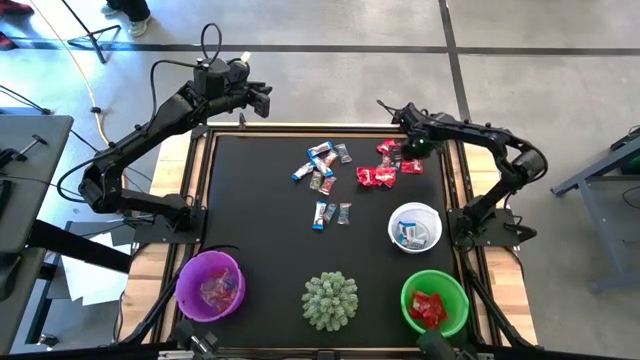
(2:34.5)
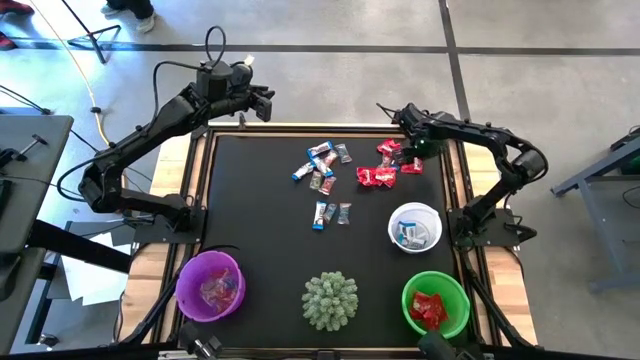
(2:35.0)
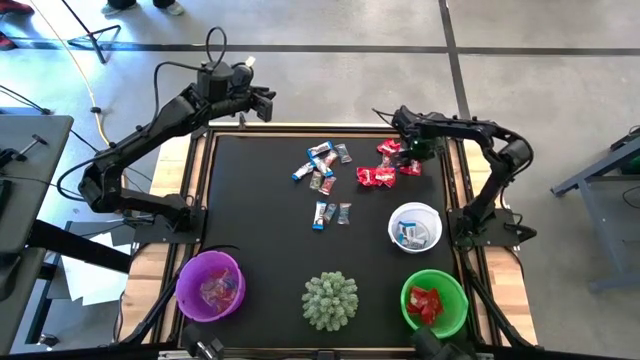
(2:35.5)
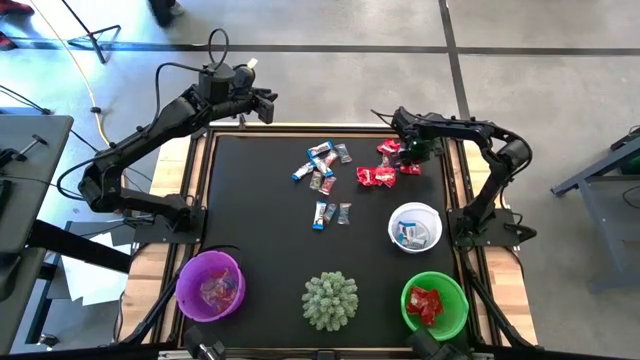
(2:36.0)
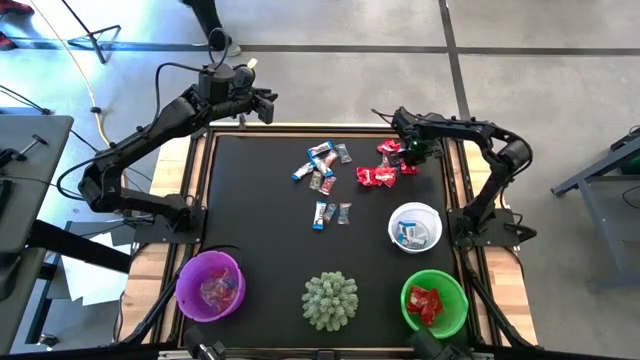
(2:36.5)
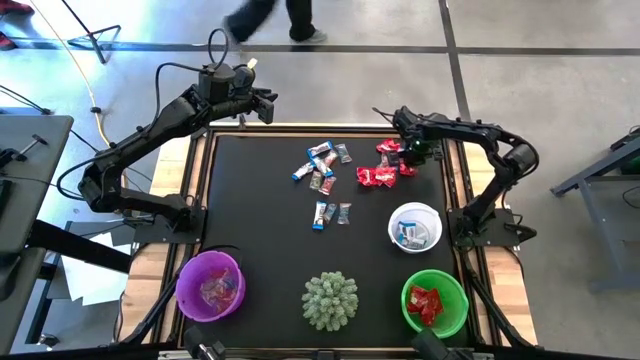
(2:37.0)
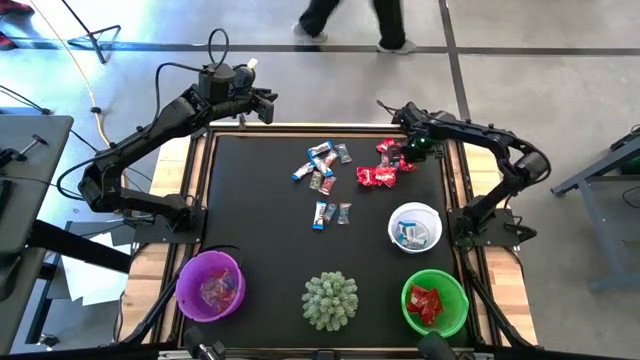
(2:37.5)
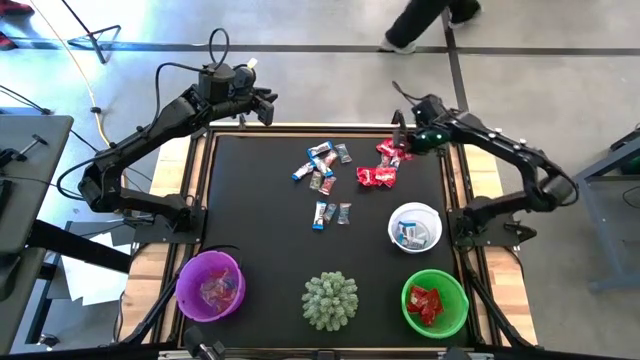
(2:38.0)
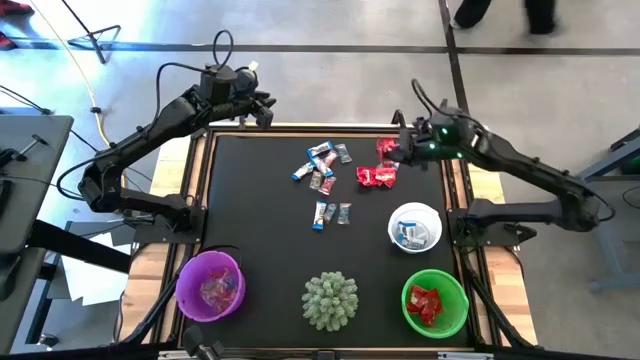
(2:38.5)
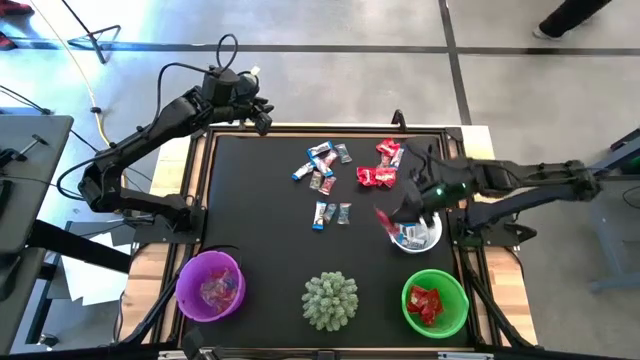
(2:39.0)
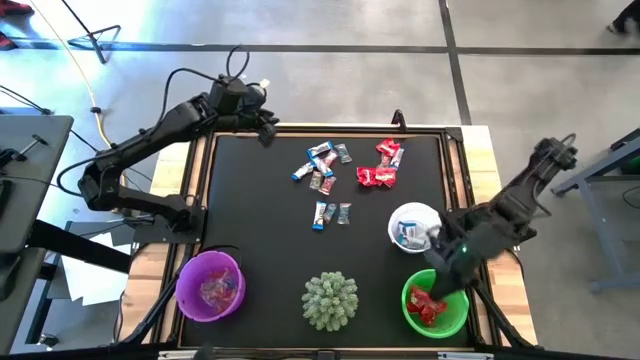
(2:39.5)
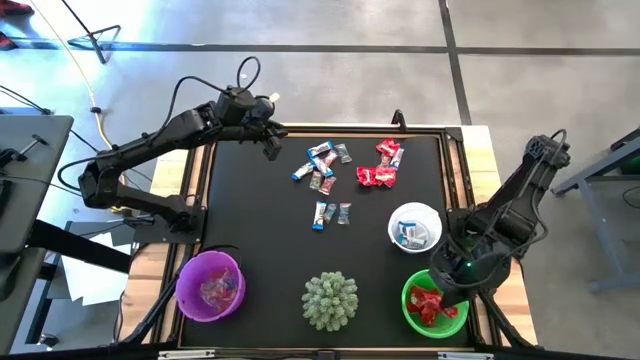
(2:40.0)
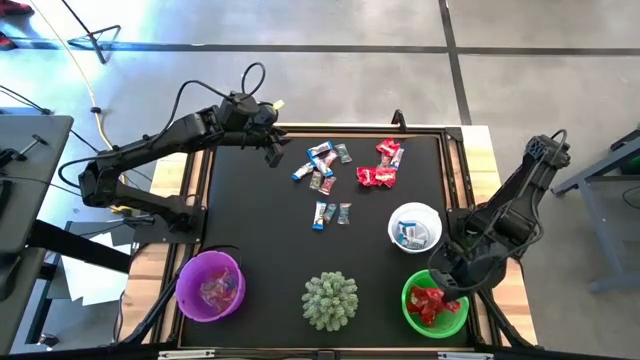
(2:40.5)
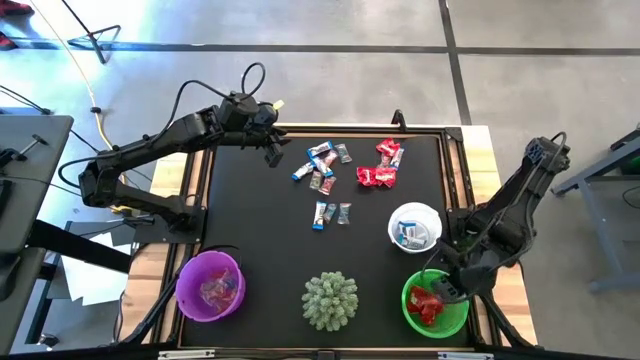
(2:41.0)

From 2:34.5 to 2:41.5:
Task: Sort candy
Put the red candy wrapper into the green bucket

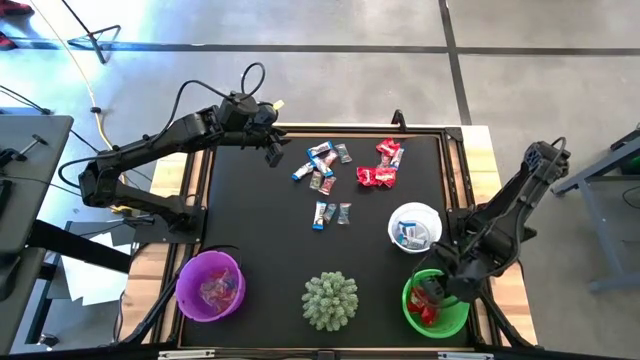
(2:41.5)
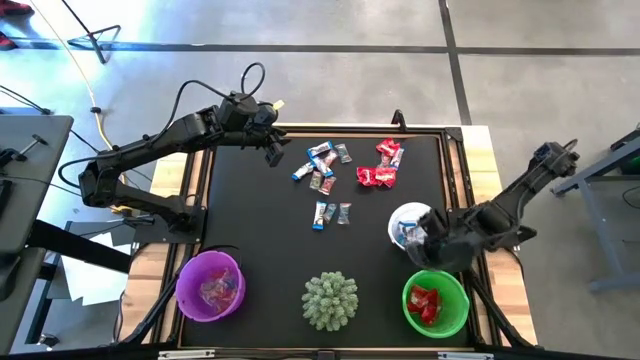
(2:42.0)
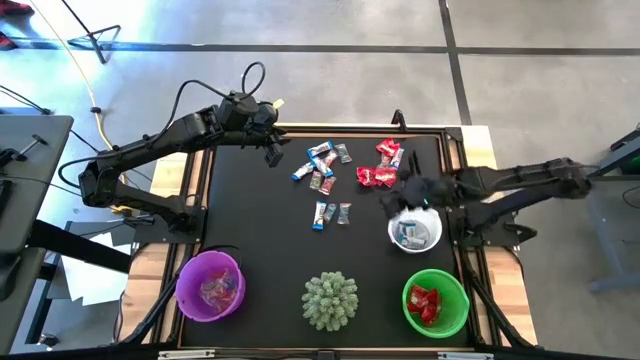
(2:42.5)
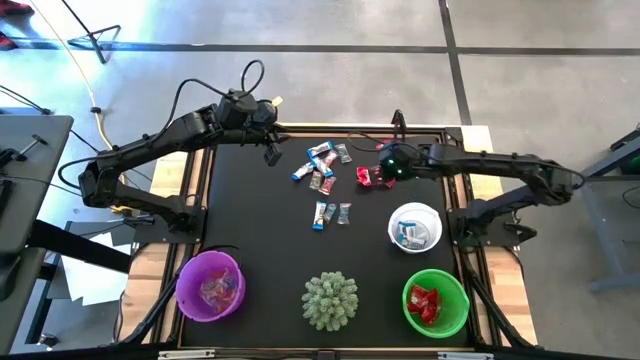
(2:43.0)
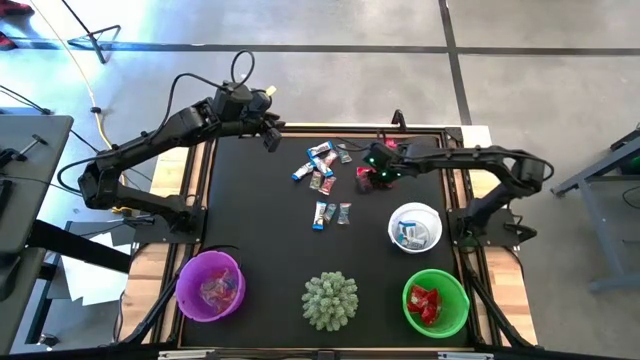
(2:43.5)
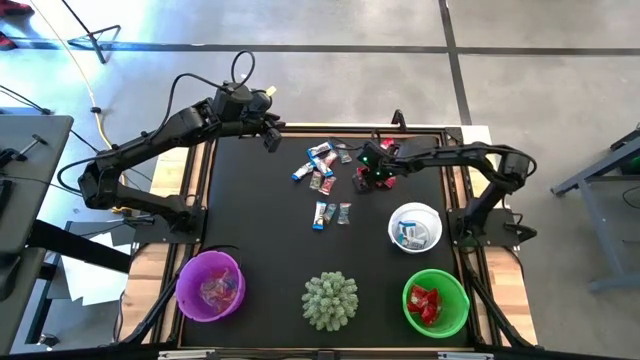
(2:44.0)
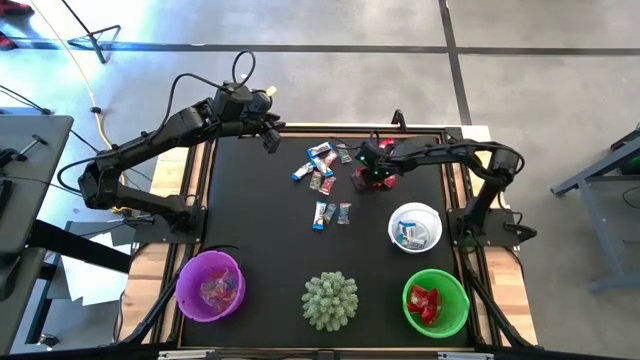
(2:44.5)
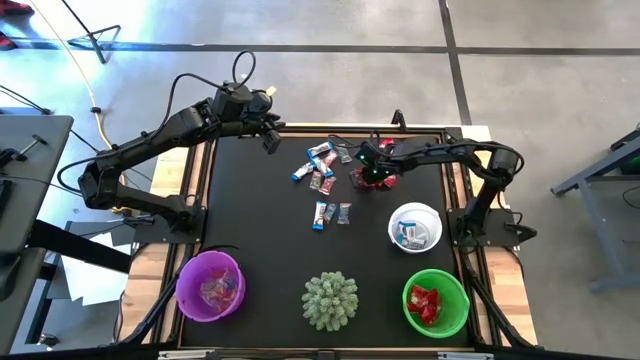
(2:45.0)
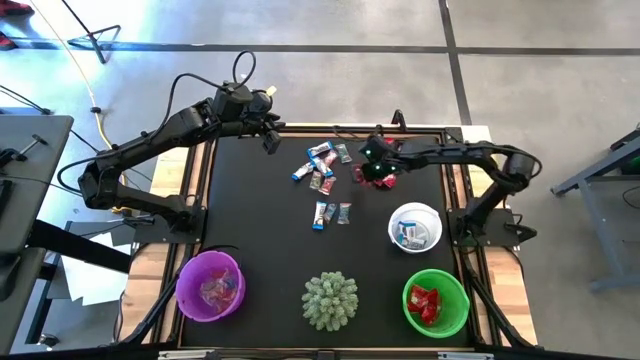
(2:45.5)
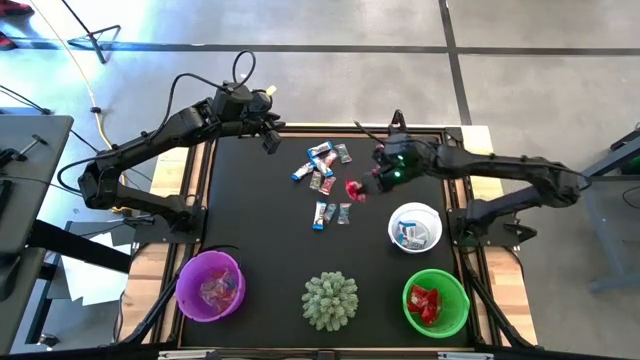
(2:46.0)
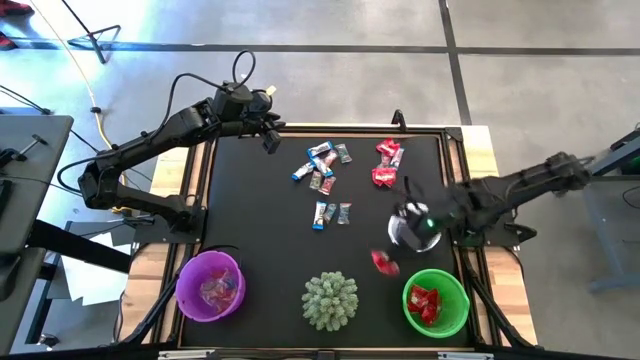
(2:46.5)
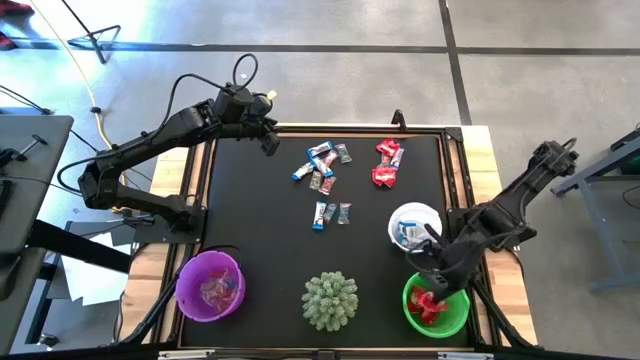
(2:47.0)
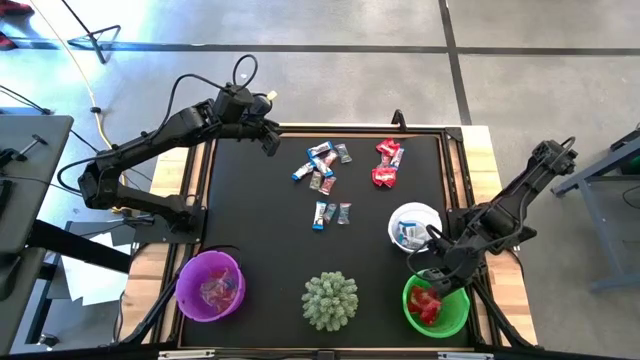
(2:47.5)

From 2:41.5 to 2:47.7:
Put the red candy wrapper into the green bucket

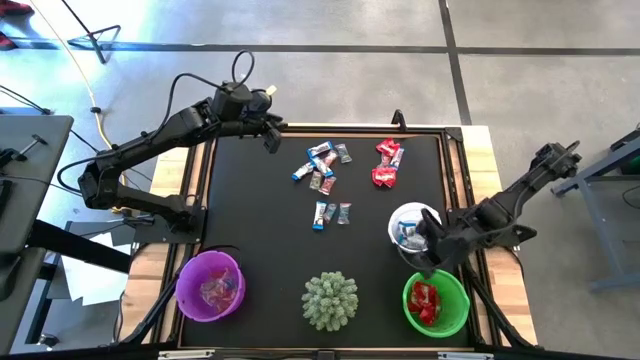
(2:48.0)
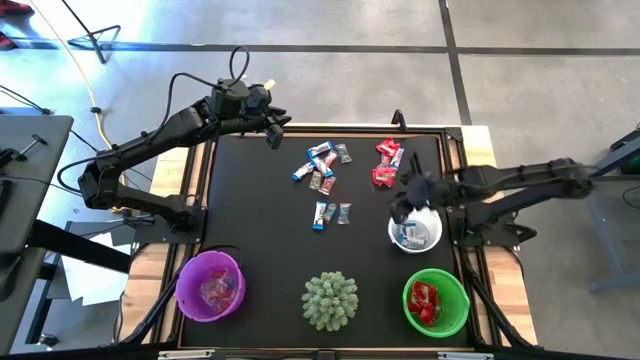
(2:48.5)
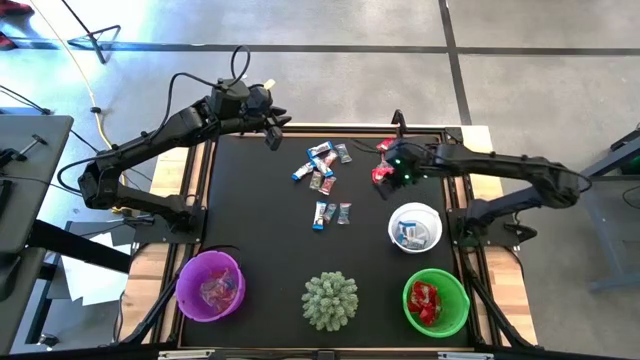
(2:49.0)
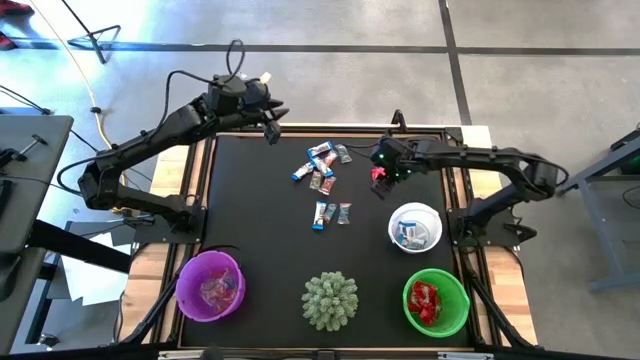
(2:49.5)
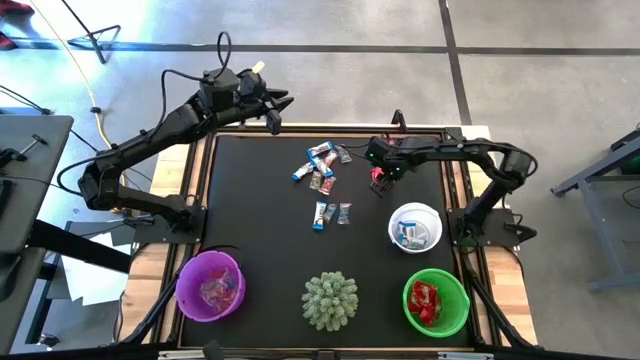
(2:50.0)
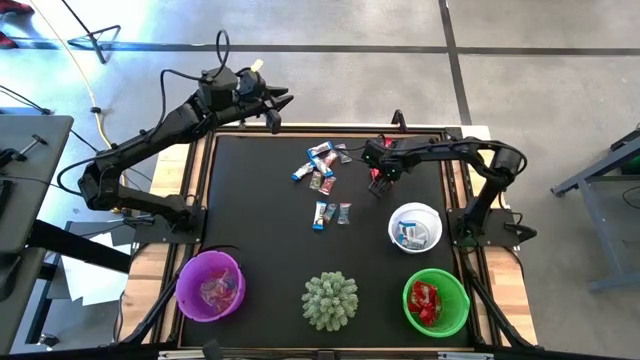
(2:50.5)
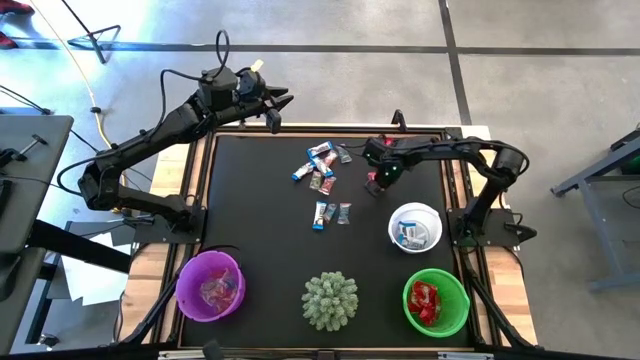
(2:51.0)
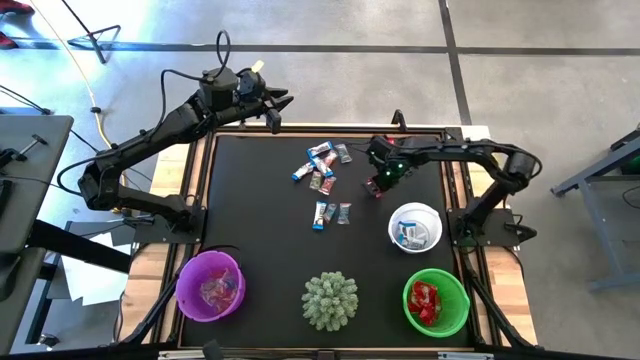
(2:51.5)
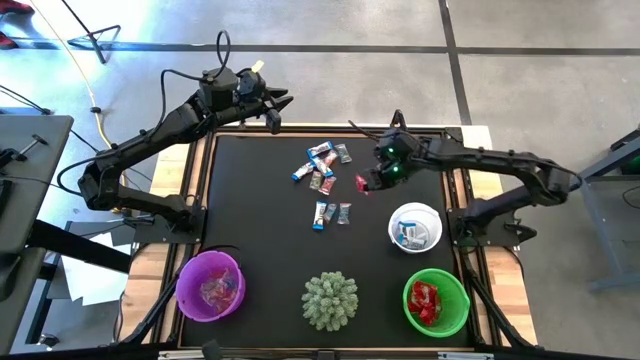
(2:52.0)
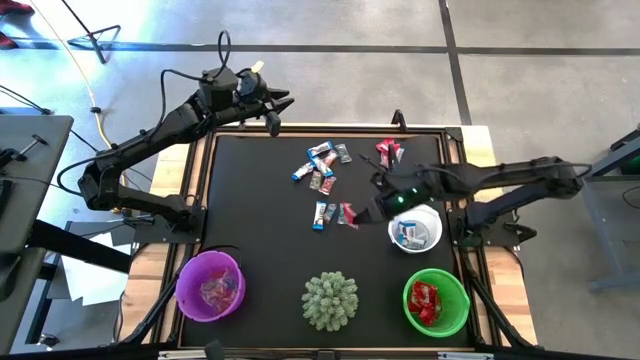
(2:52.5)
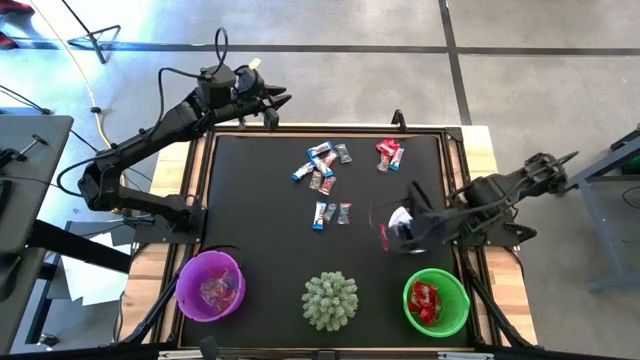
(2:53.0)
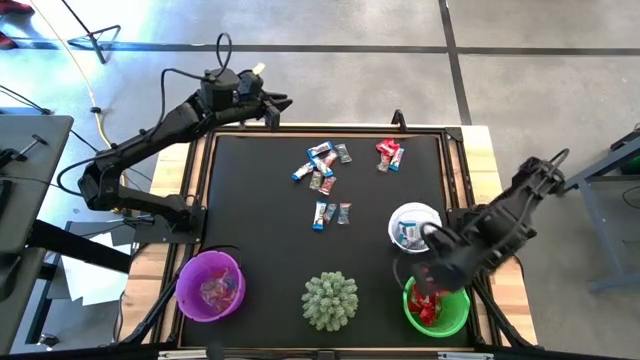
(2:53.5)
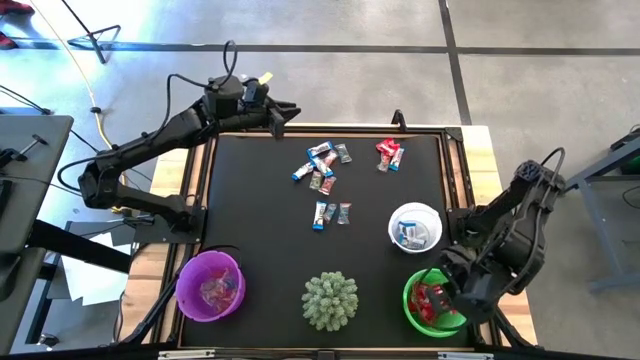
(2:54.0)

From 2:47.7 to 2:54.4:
Put the red candy wrapper into the green bucket

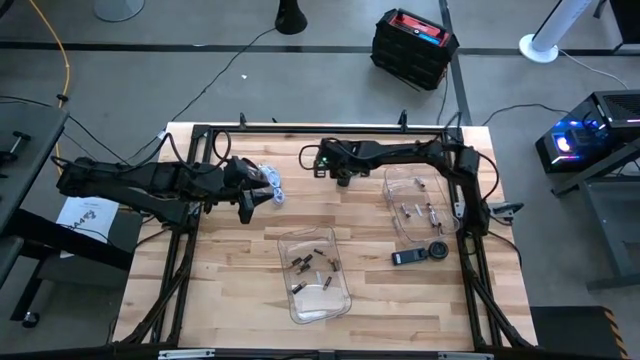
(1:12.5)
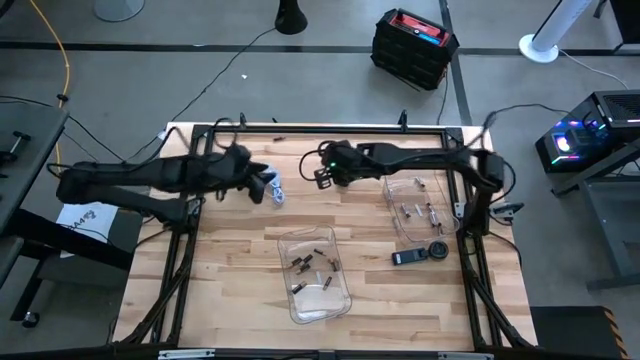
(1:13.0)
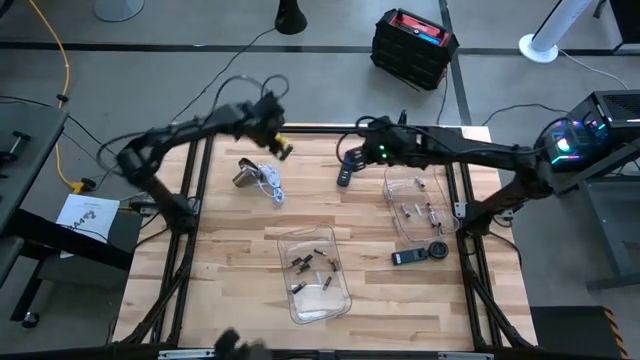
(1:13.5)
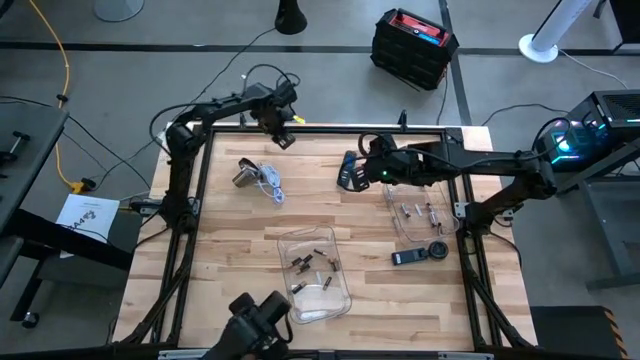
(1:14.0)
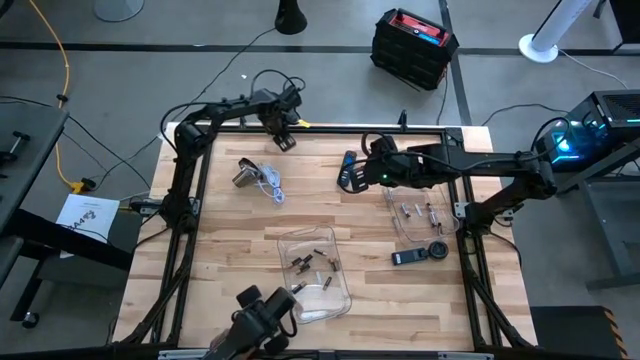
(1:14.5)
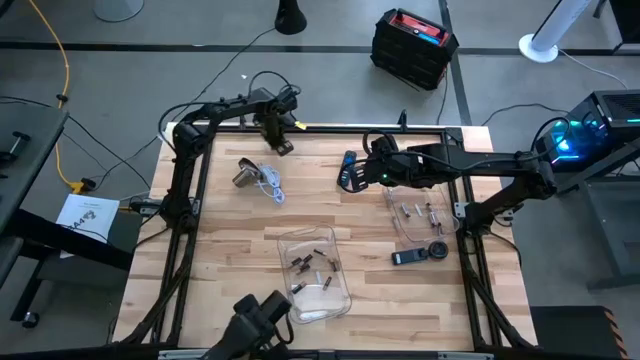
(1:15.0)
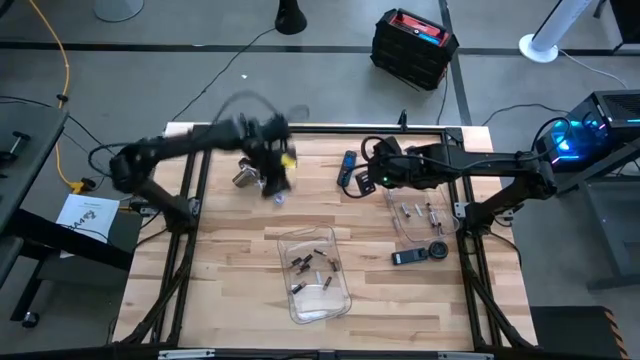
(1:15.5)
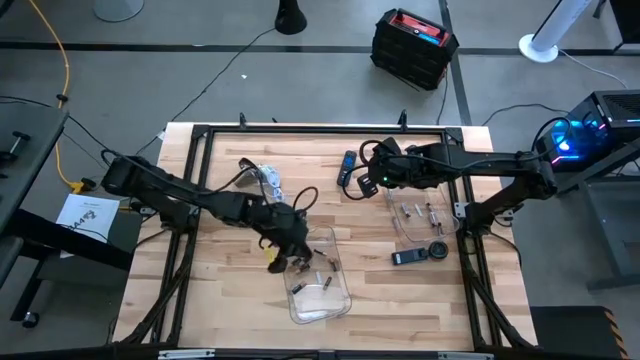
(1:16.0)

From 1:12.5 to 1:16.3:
Task: Sort batteries
Put the black battery into the left transparent bin
